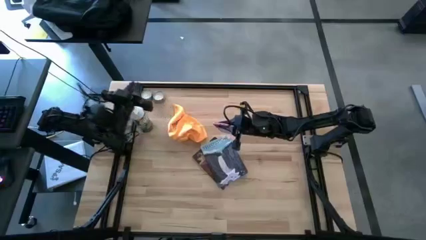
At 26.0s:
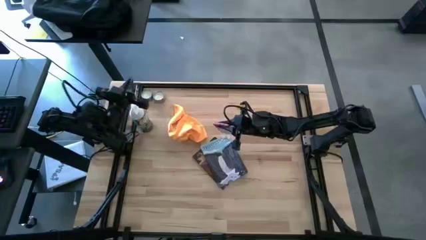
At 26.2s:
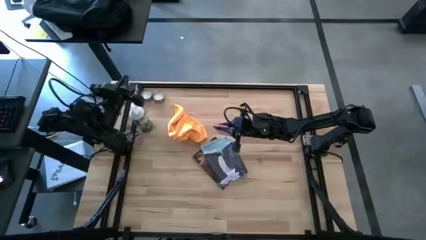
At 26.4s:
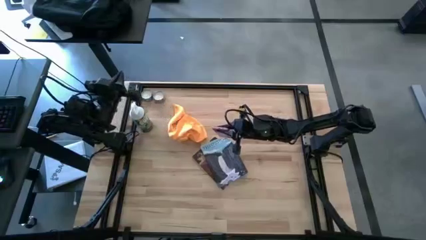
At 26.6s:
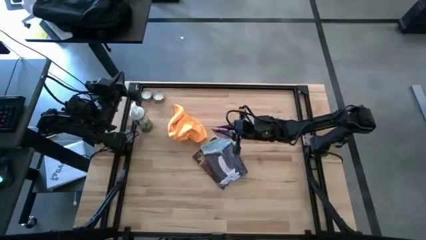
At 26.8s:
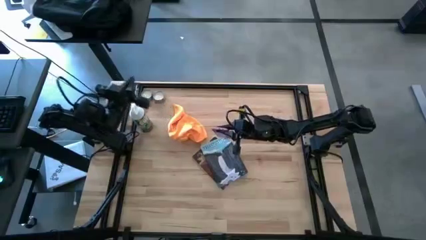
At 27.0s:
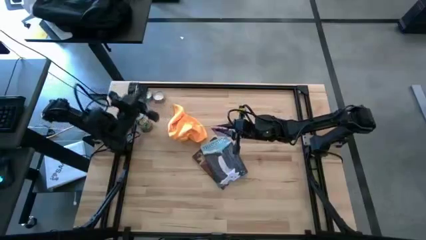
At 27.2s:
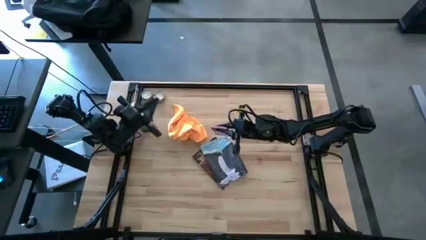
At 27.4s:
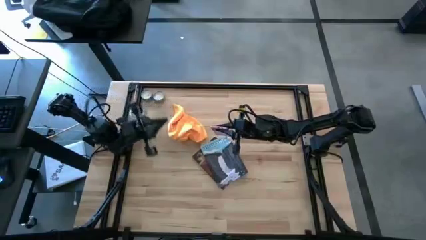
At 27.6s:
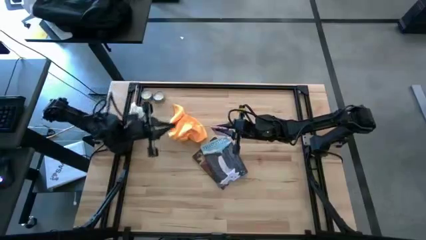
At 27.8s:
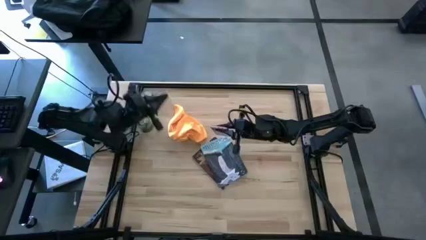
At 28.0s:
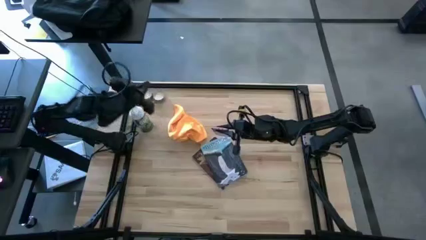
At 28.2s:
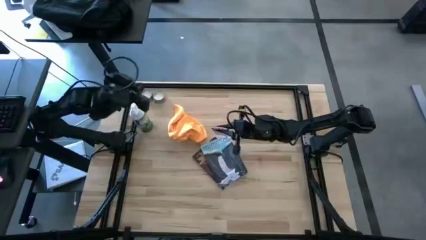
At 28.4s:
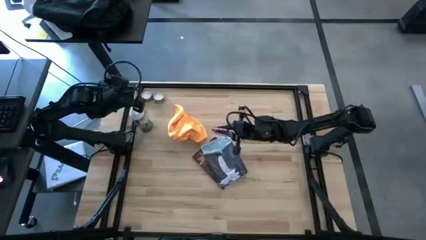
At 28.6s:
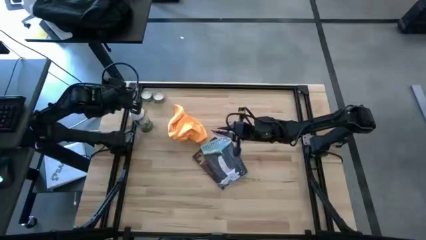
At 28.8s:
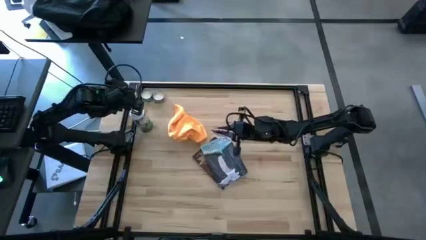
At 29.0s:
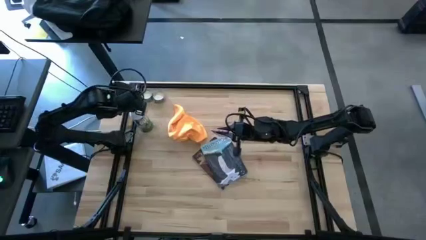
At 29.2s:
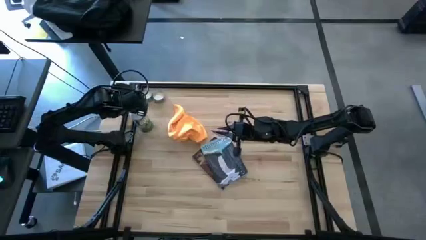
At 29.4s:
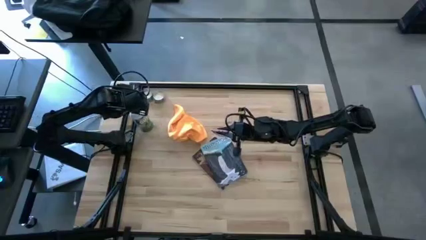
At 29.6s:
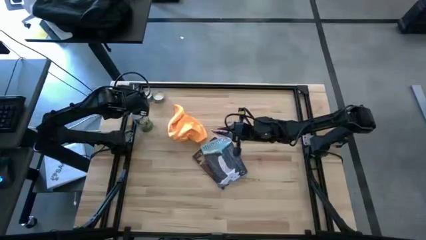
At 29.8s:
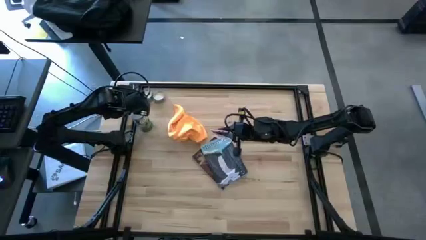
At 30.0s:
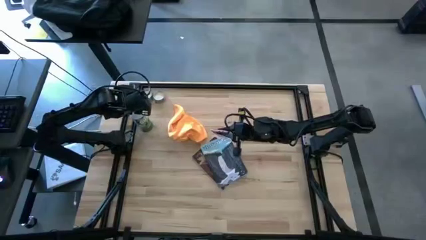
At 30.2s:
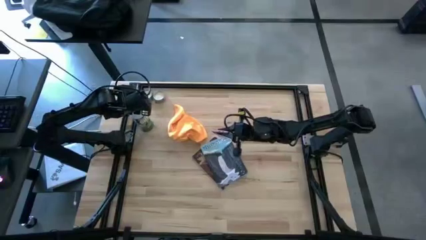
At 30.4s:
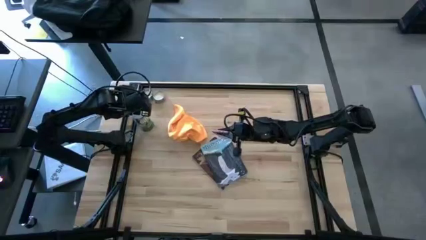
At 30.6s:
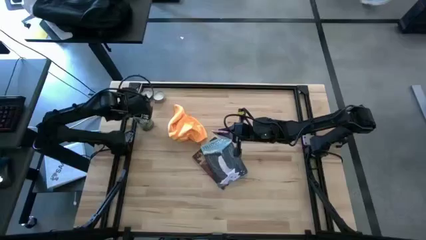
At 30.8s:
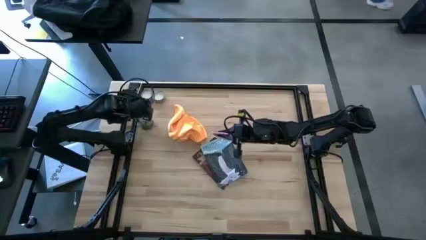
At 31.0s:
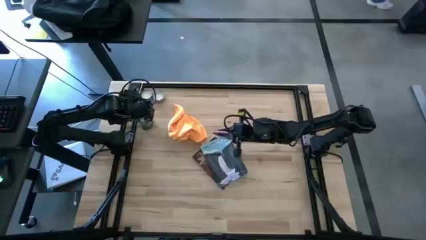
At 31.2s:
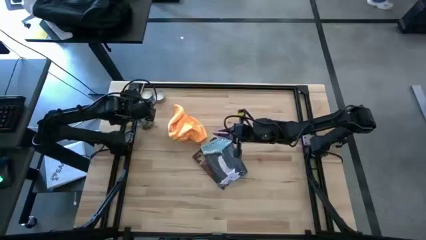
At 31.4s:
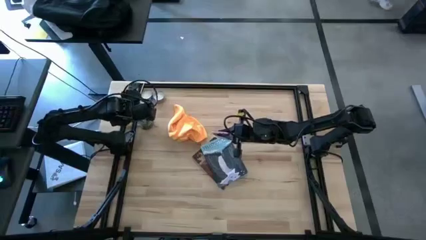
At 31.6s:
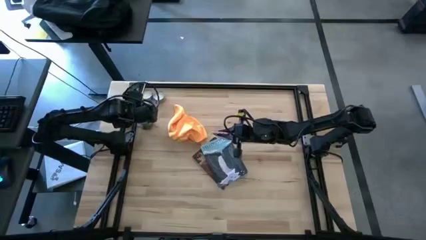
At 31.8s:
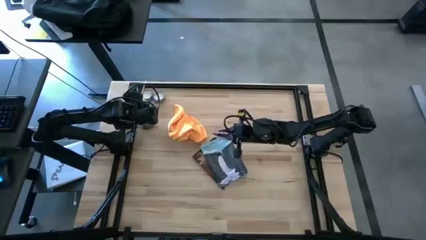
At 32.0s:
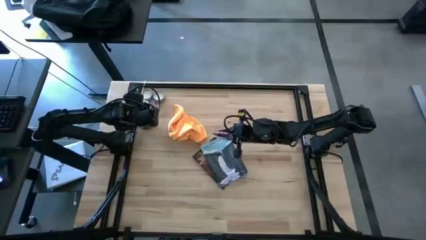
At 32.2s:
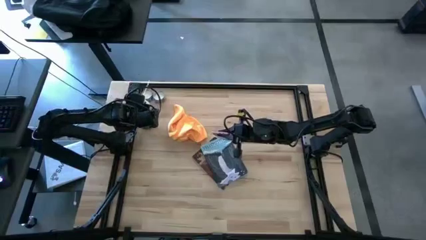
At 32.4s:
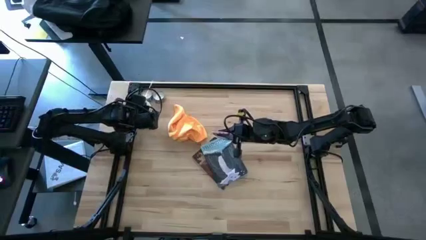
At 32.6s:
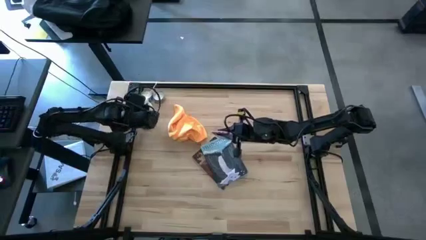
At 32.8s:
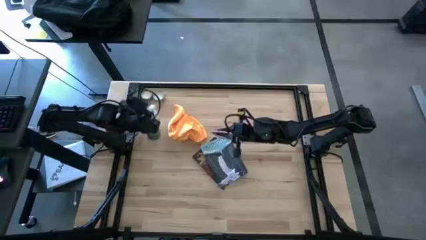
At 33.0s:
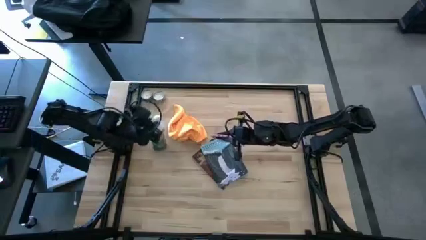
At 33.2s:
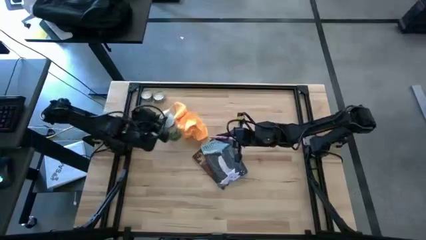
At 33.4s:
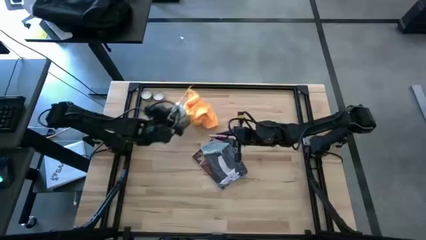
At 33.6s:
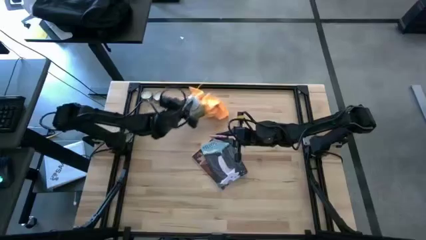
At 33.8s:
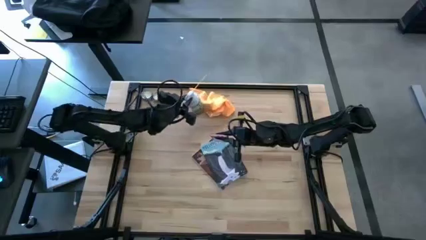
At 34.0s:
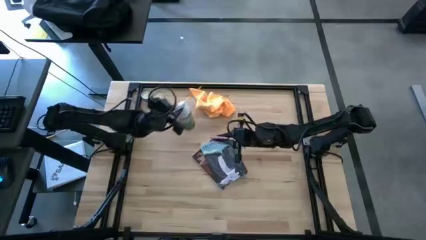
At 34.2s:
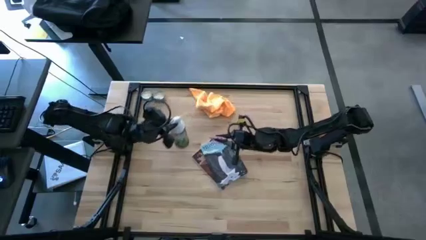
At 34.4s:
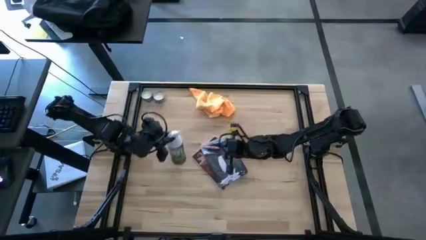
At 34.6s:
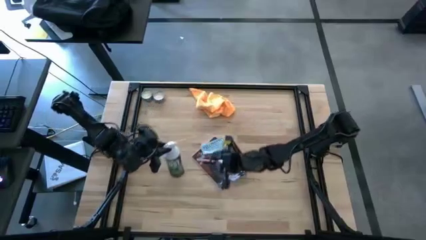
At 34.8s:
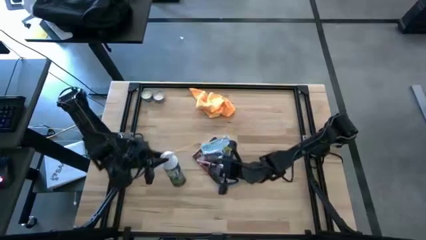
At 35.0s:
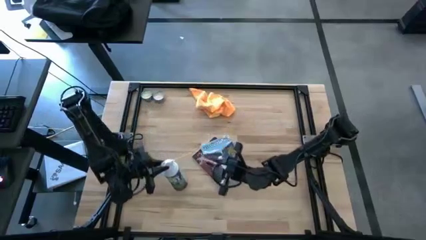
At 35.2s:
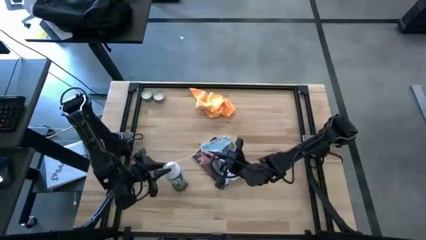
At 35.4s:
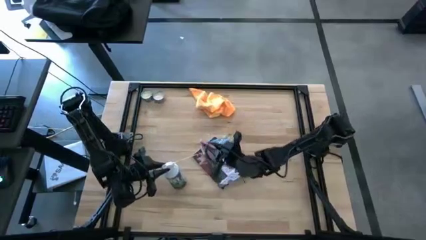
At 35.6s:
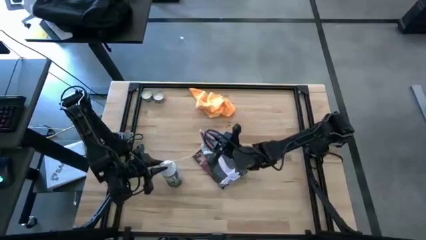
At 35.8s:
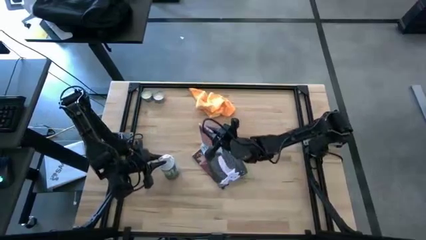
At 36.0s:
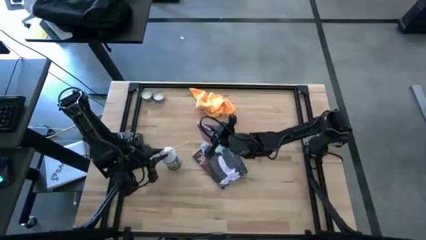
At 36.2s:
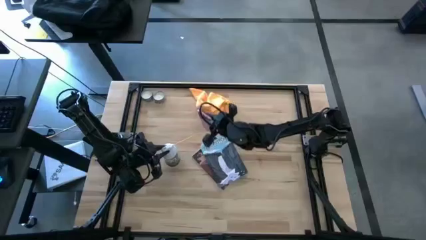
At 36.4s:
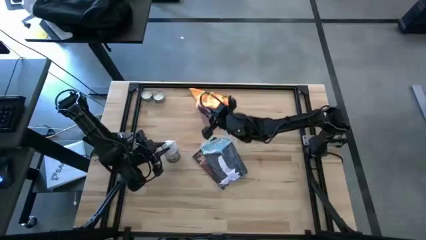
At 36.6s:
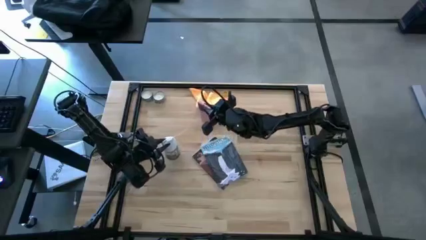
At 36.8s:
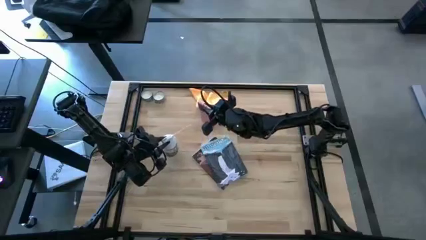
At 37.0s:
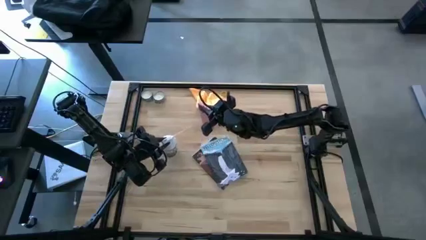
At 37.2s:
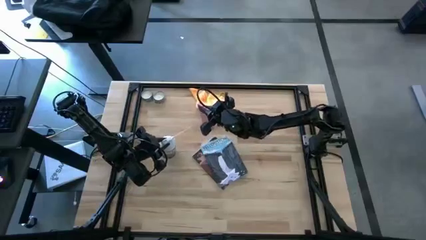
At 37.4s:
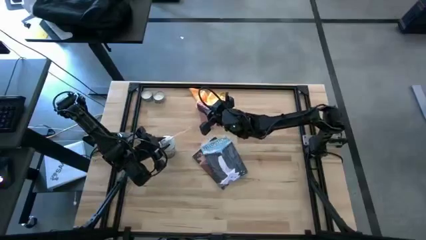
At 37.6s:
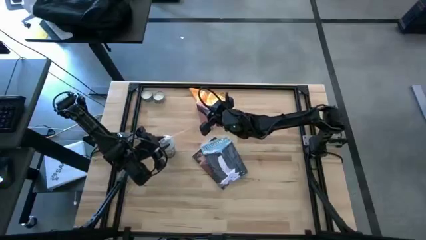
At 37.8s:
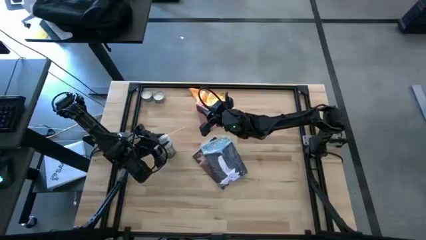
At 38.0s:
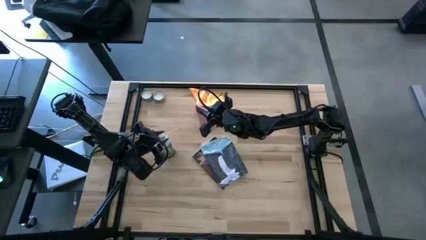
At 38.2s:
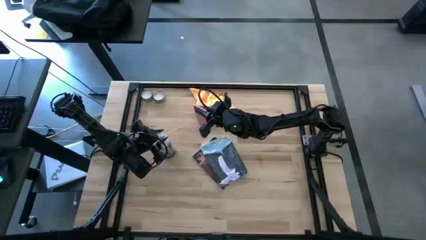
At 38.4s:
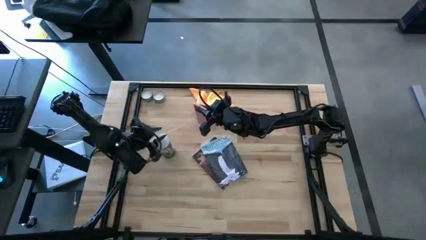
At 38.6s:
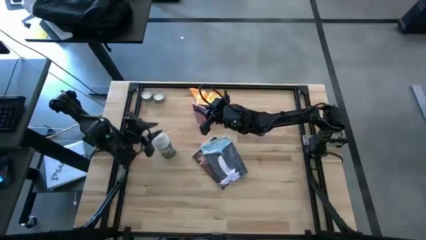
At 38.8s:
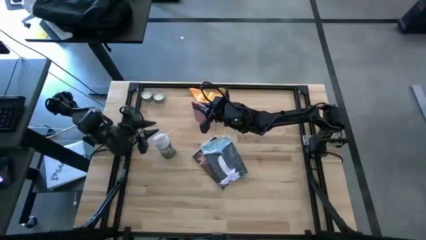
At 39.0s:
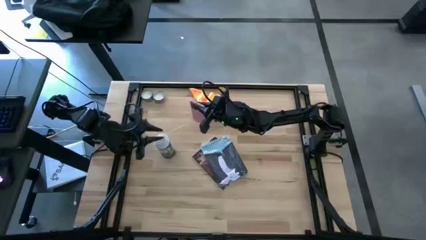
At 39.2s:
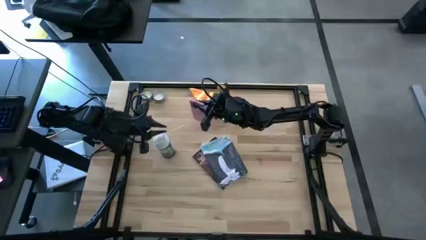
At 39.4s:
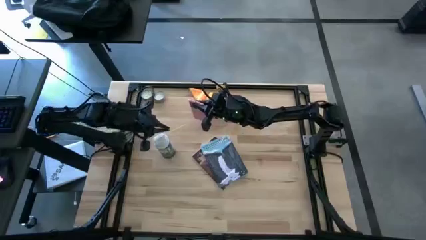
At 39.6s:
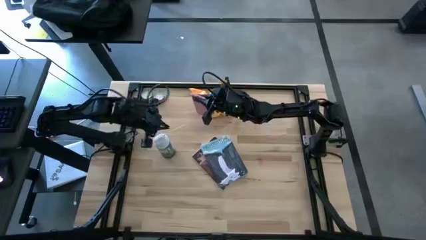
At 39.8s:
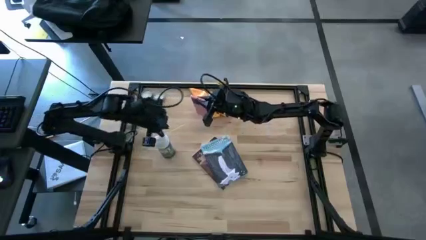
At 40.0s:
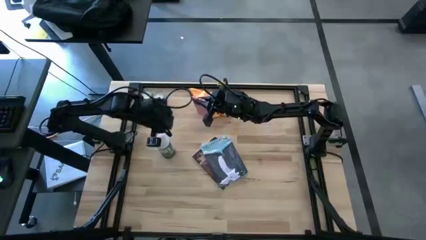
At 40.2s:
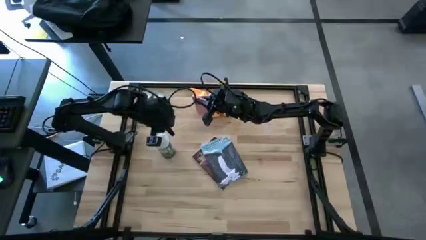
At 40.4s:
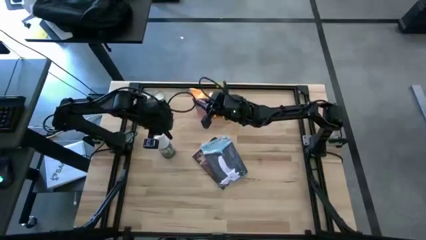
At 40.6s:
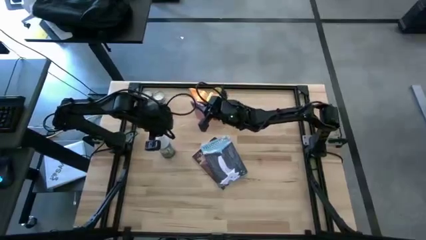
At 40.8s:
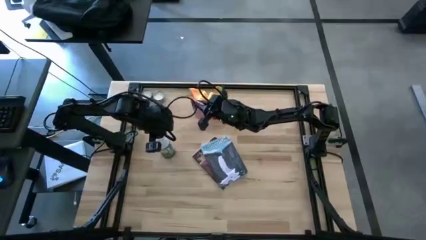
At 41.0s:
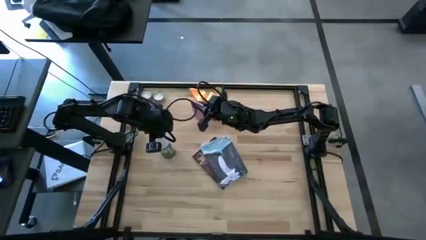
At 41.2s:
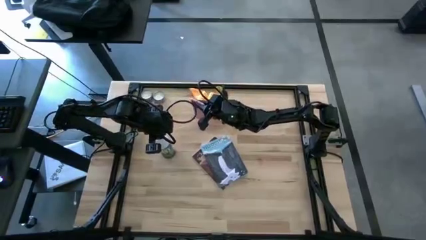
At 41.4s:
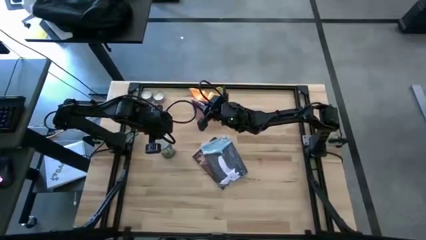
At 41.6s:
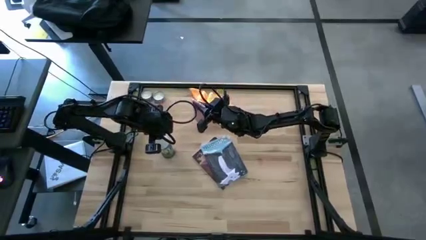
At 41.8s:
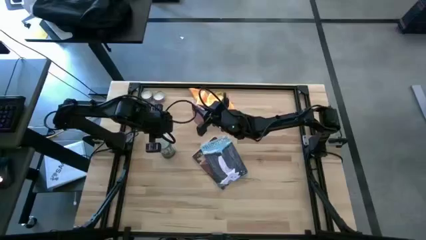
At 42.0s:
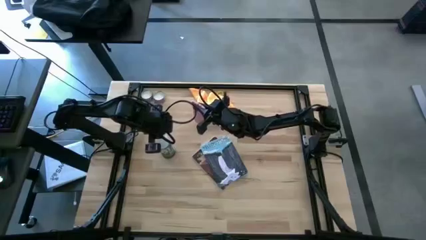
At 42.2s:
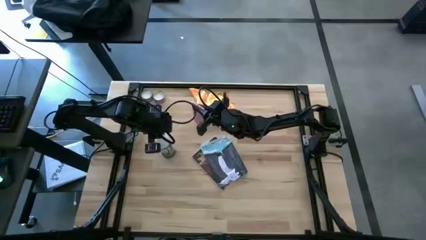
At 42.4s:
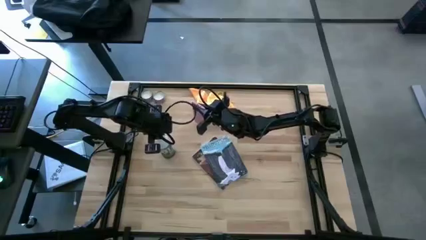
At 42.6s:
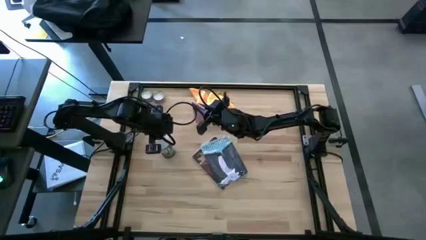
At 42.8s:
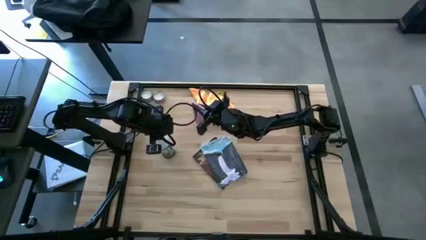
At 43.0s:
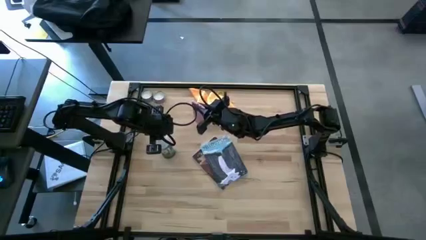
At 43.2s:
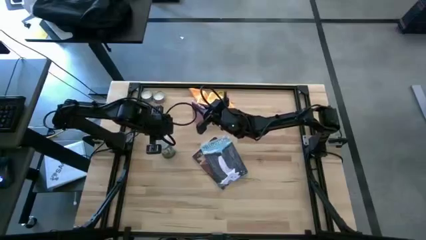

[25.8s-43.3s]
Task: Apply microfiber cloth
Spray the cellphone using the spray bottle
